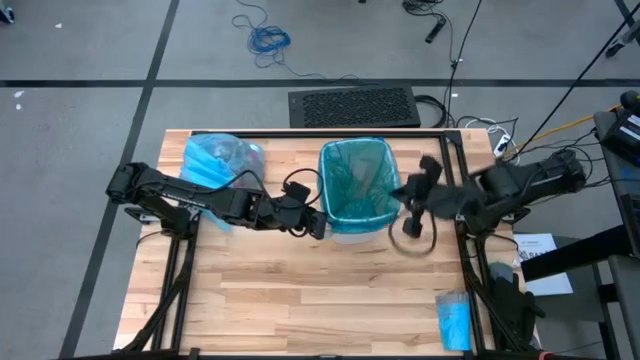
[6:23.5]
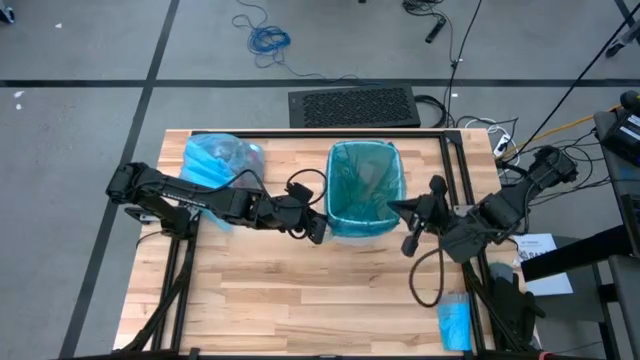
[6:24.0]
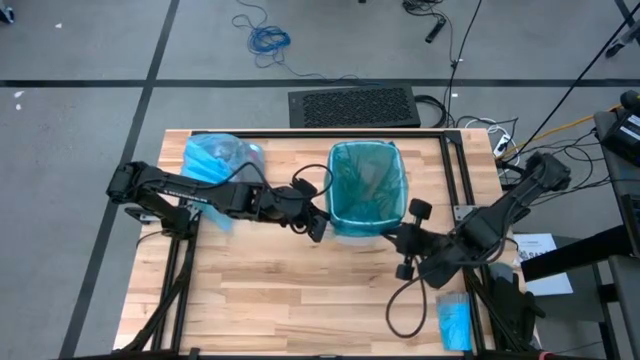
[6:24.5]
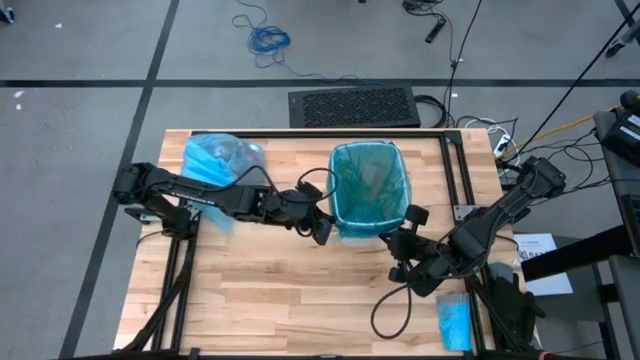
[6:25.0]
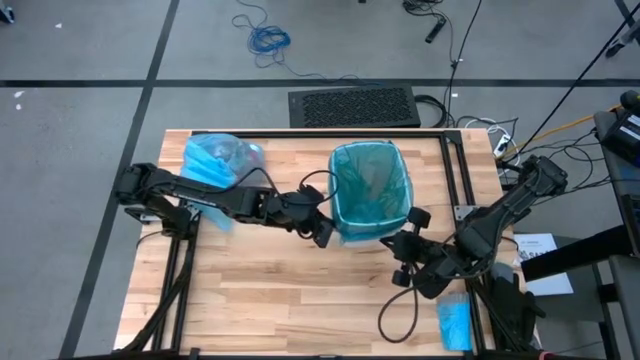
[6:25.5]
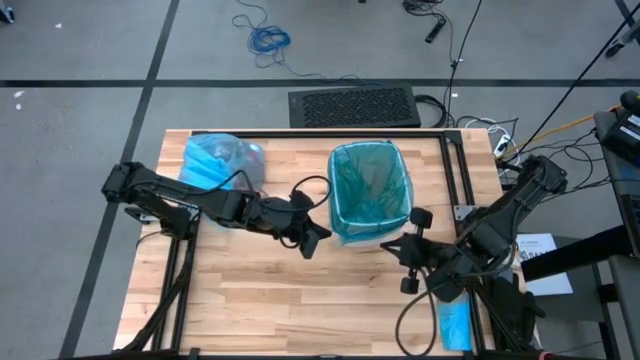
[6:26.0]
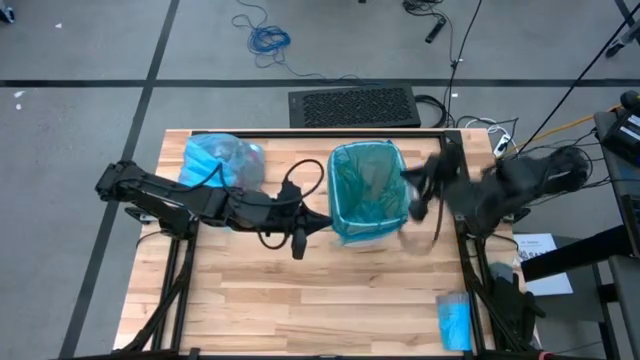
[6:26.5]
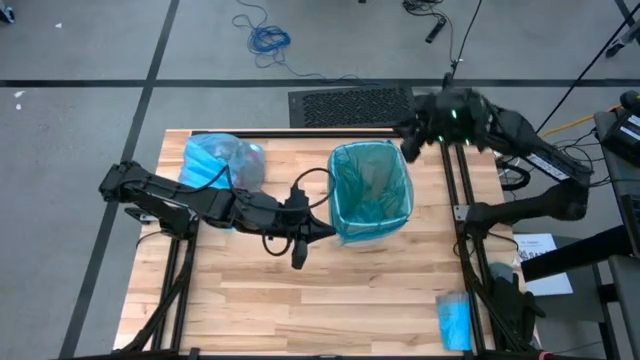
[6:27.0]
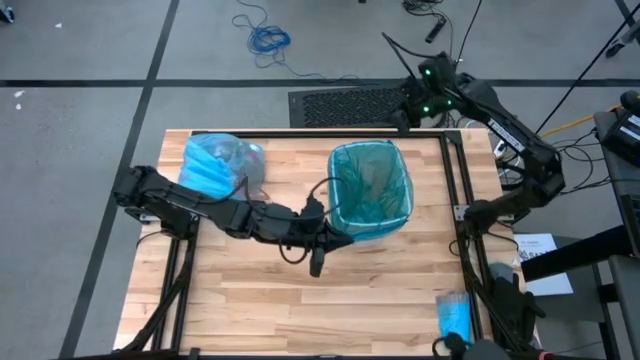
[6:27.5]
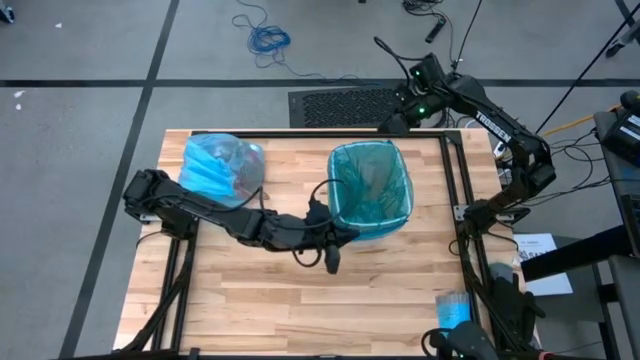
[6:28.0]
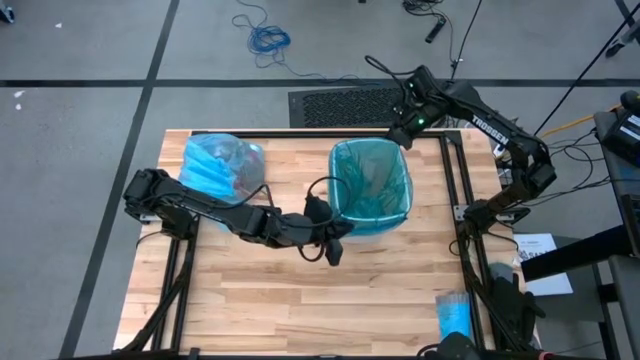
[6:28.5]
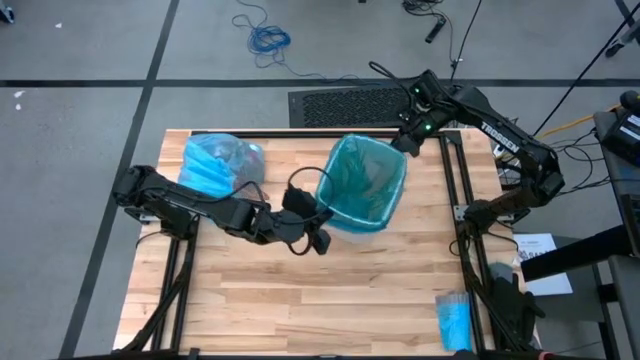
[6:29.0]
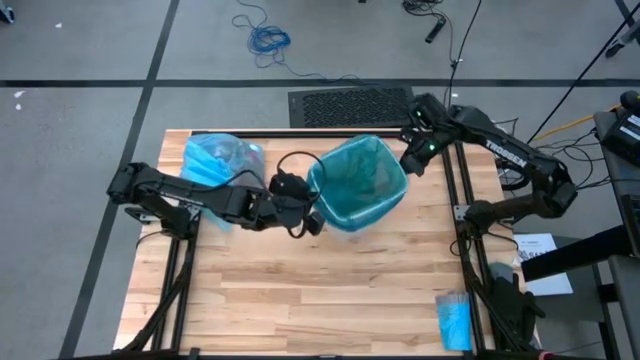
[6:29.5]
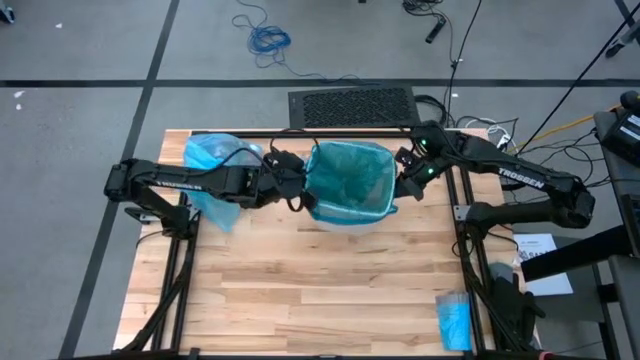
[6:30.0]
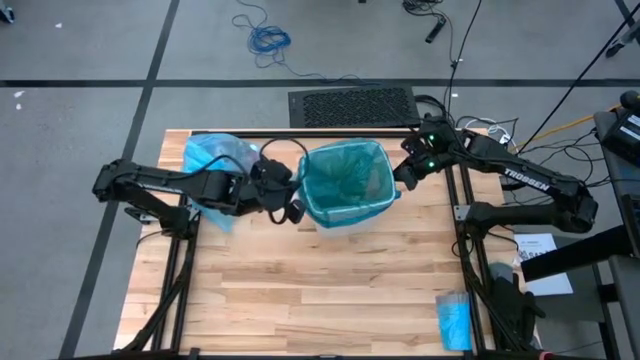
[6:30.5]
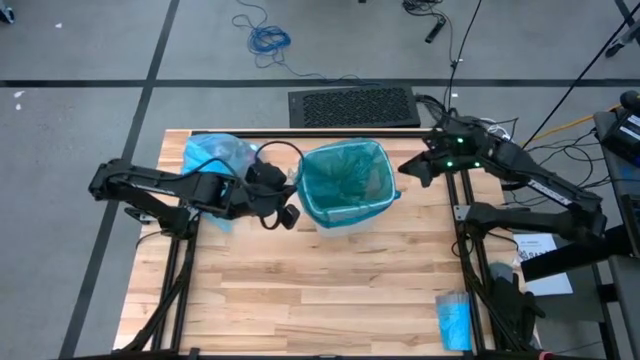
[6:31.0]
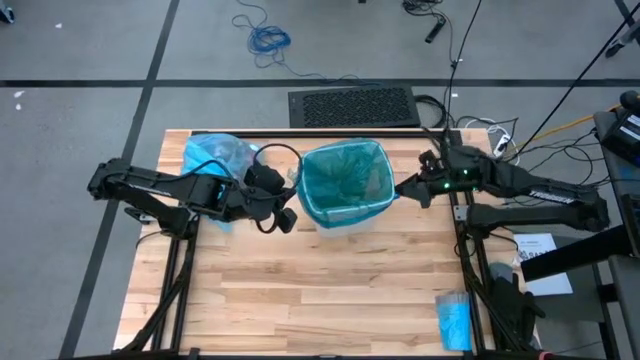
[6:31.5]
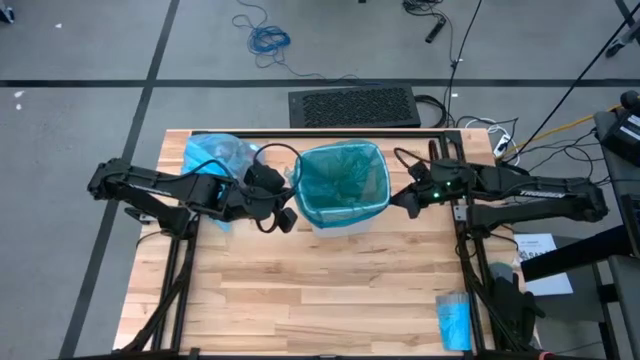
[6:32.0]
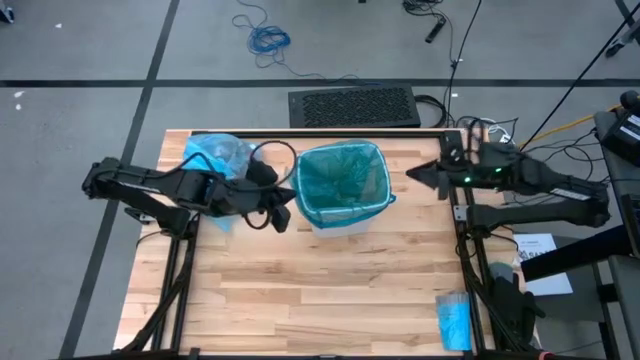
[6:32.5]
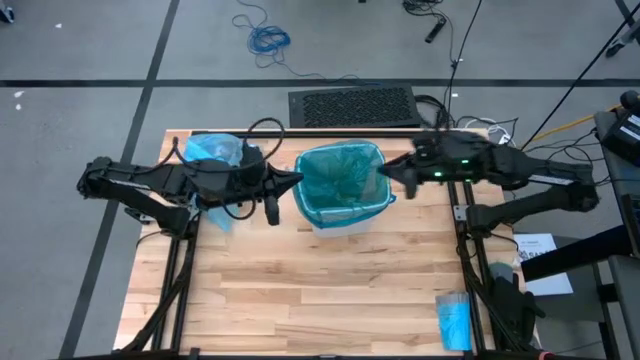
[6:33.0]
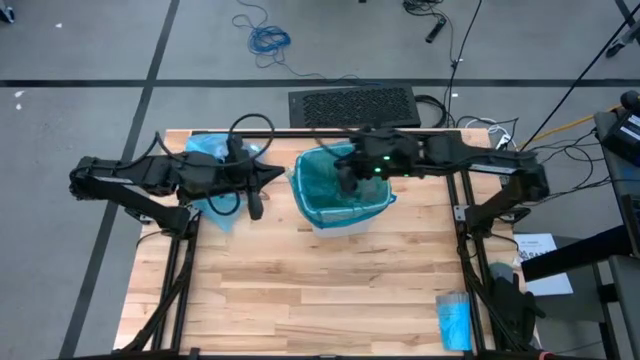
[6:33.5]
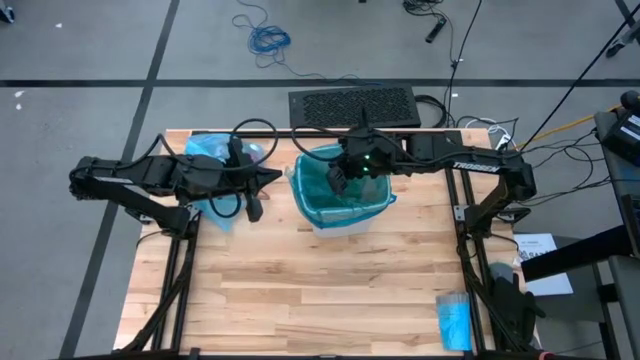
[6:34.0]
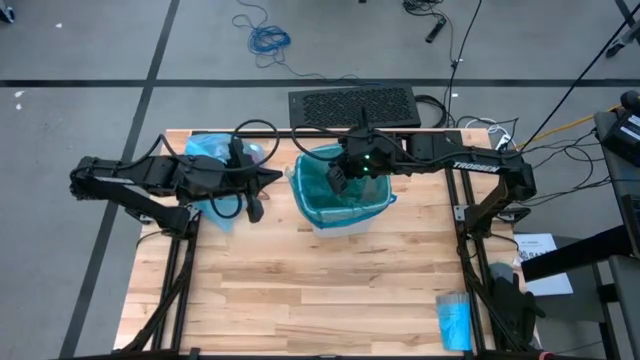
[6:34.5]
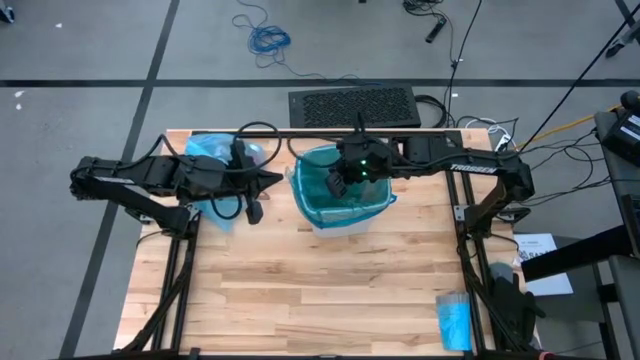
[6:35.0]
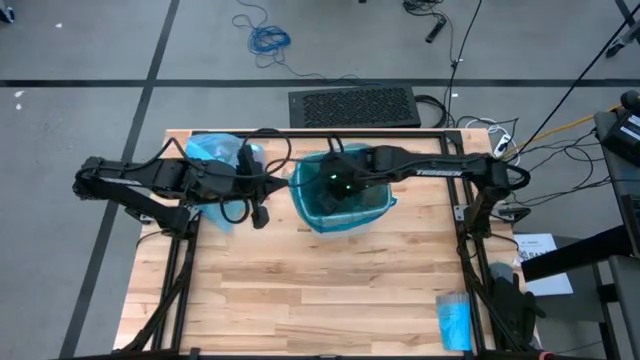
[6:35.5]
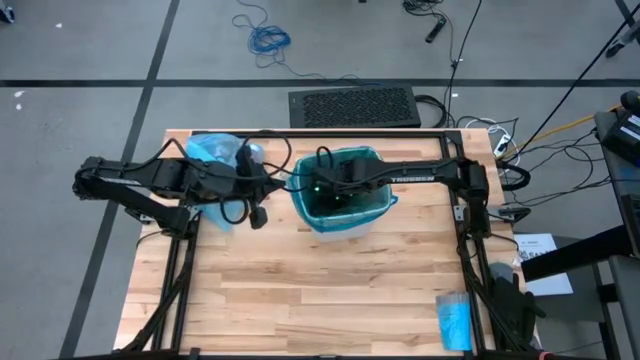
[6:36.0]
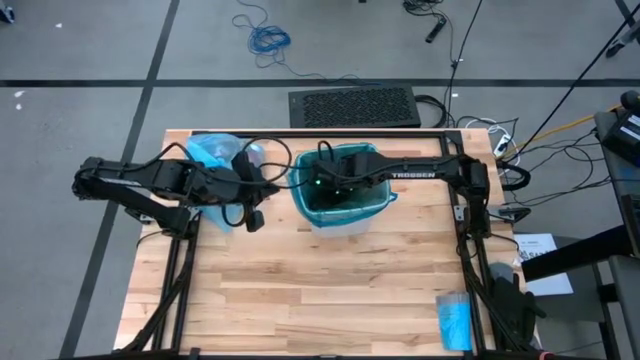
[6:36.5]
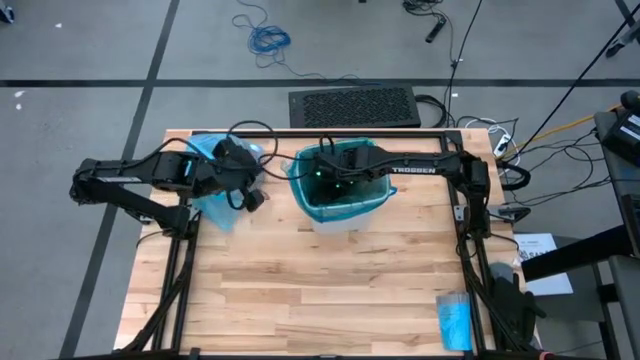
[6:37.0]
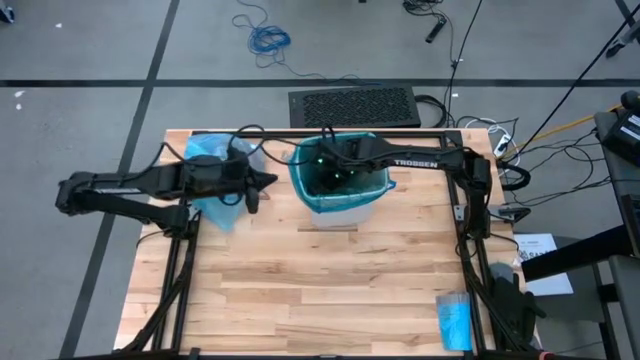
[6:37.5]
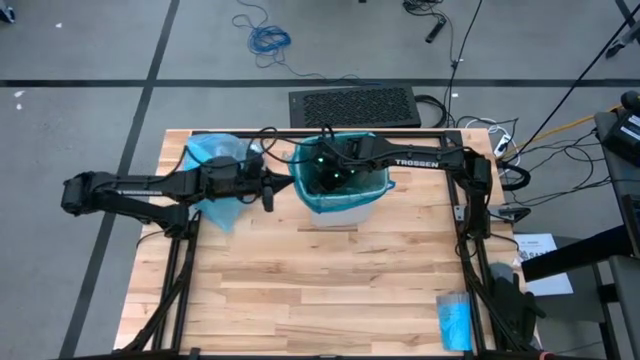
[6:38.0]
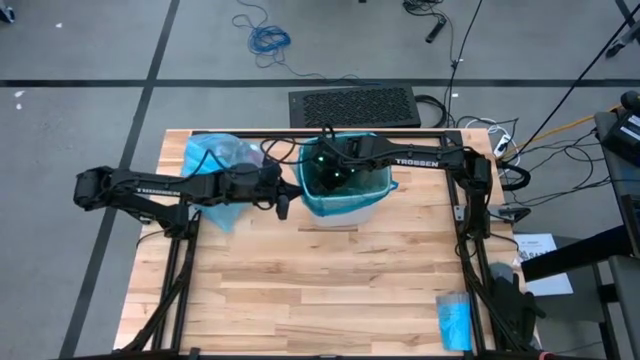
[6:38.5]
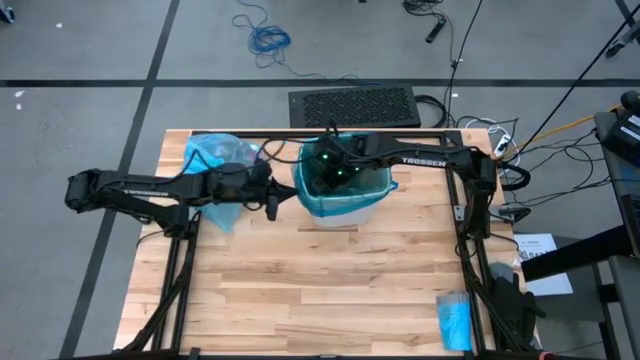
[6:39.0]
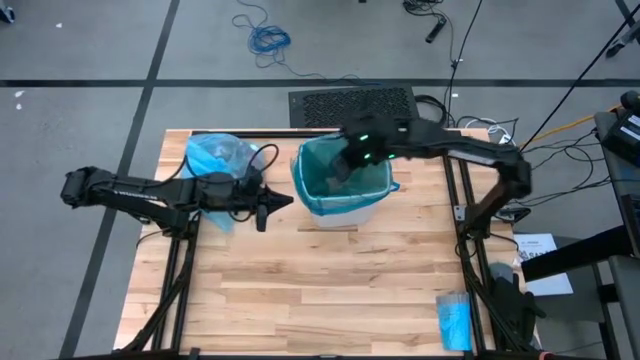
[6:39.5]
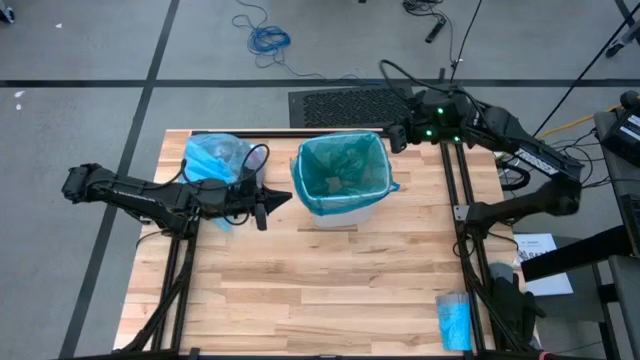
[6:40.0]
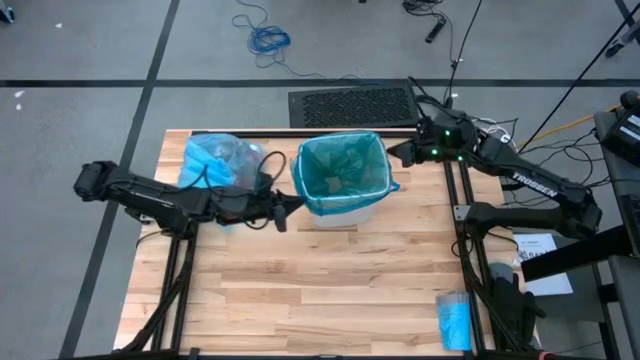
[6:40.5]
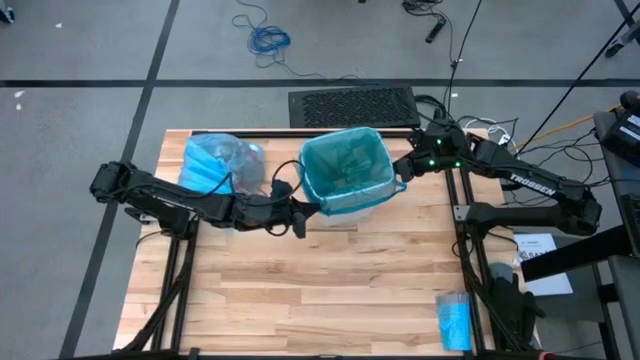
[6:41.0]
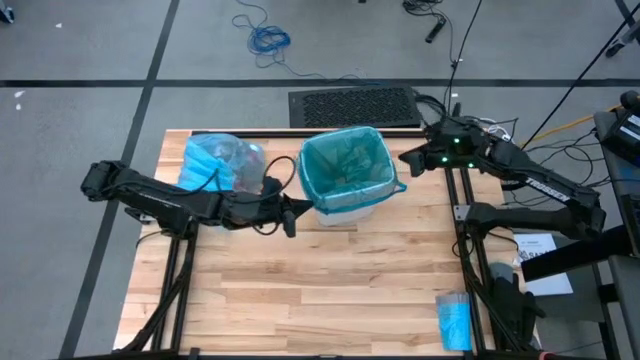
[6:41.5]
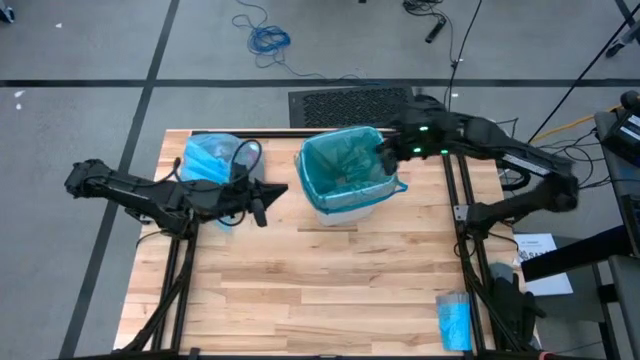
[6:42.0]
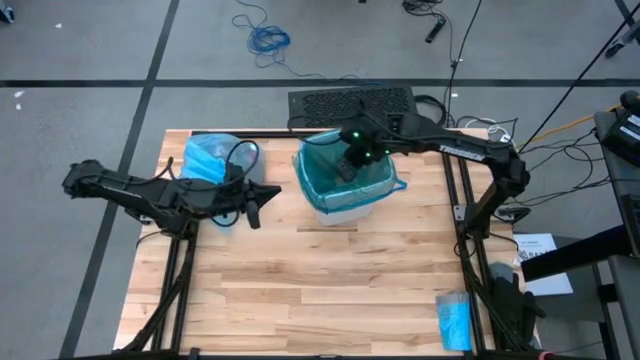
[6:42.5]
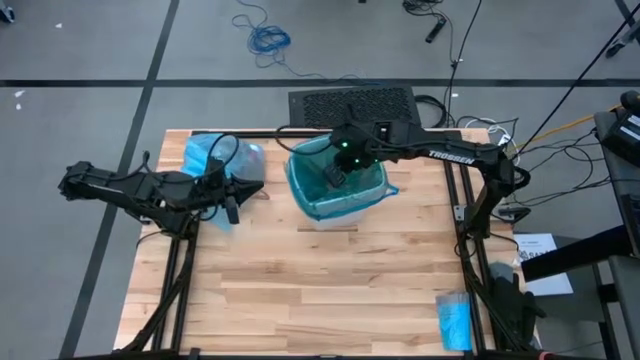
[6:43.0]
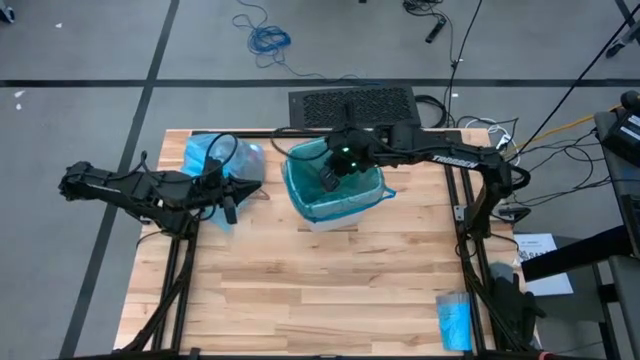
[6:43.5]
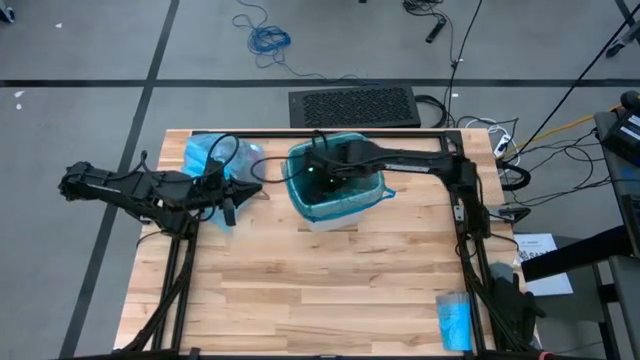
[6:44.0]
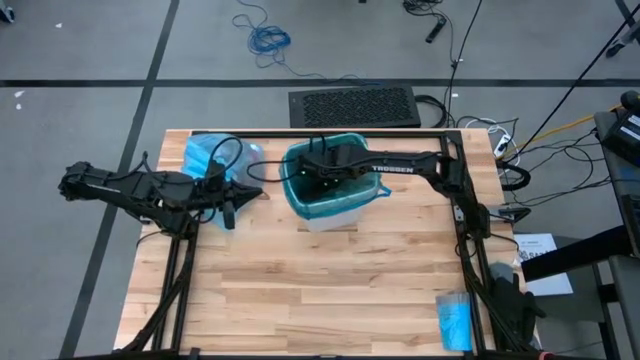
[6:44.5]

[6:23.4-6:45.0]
Task: place trash/remove bag and relplace
Insert the new blue trash bag into the white trash bin
